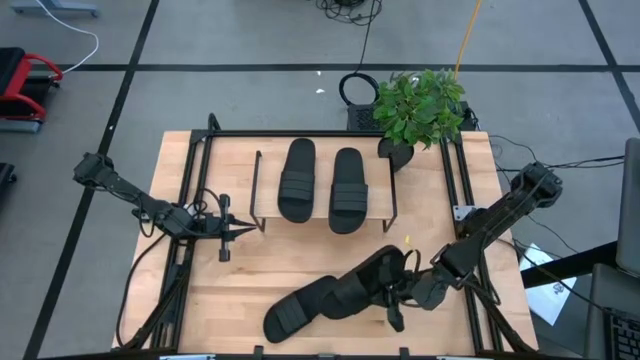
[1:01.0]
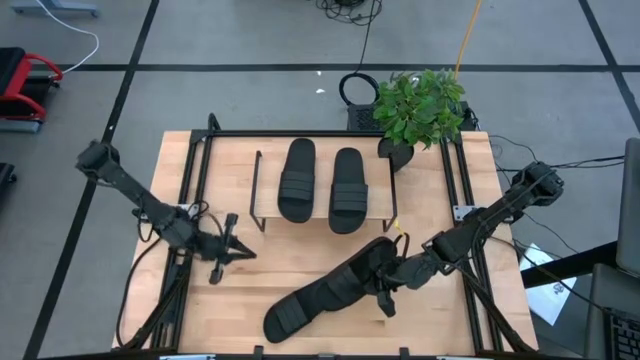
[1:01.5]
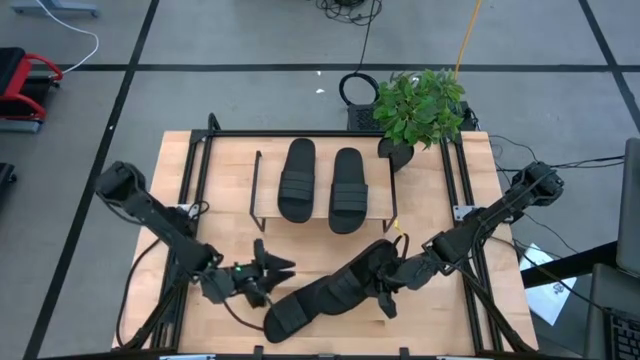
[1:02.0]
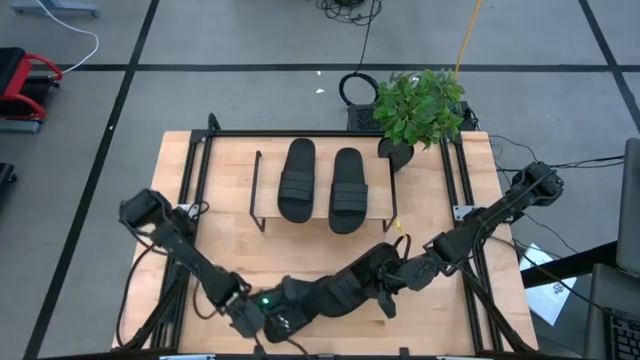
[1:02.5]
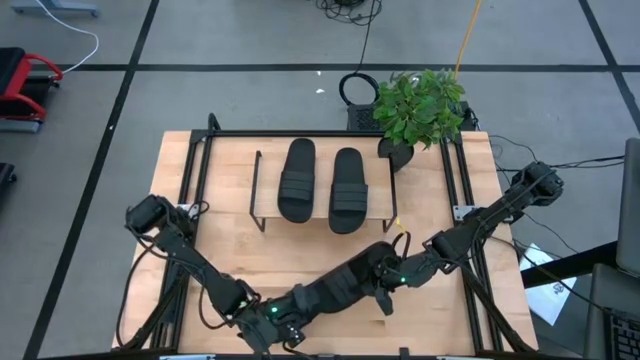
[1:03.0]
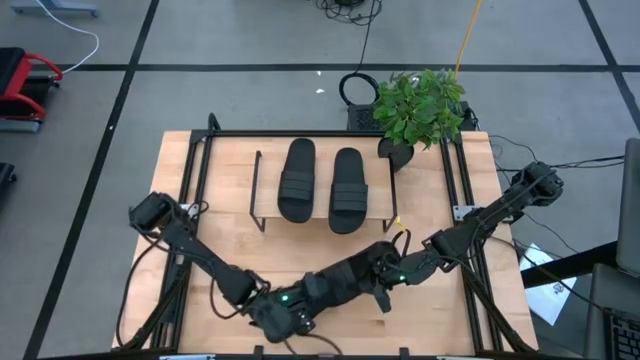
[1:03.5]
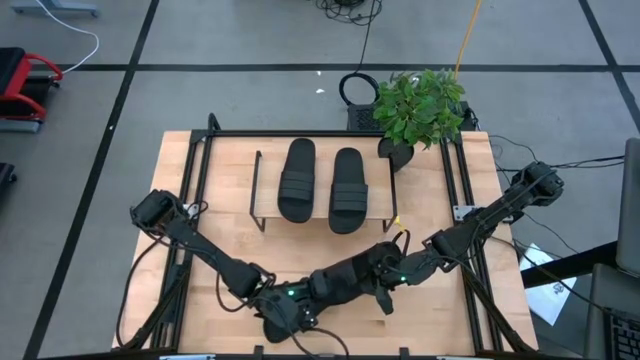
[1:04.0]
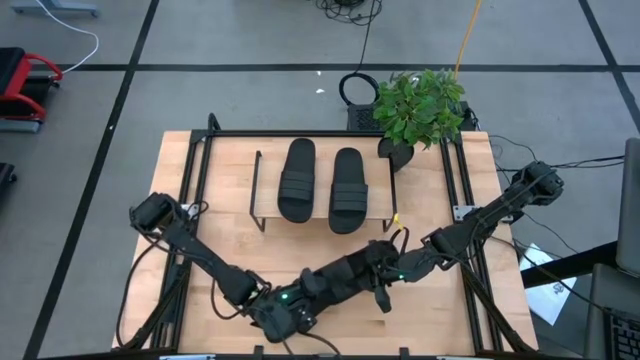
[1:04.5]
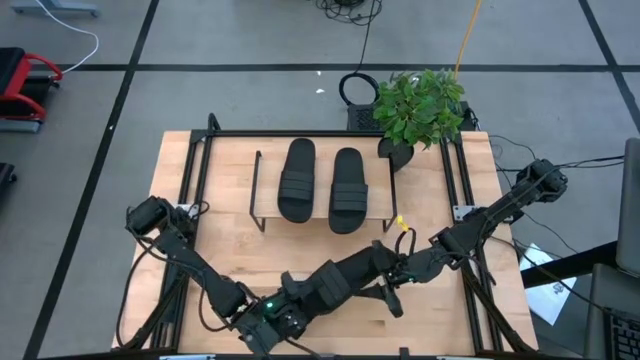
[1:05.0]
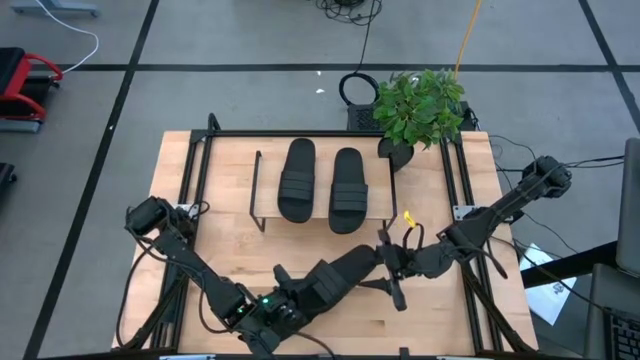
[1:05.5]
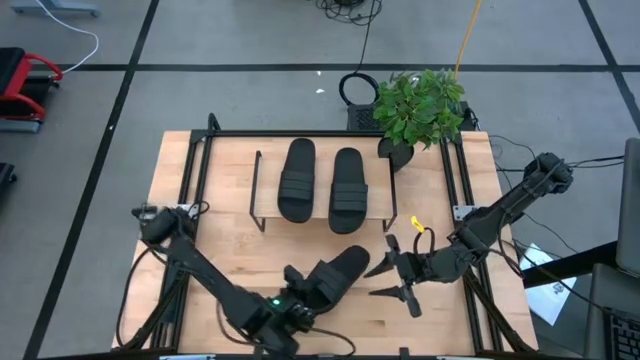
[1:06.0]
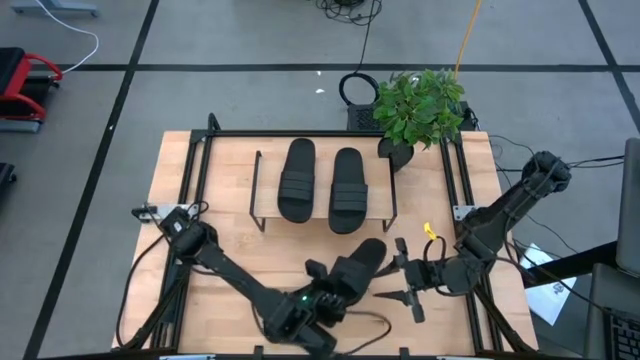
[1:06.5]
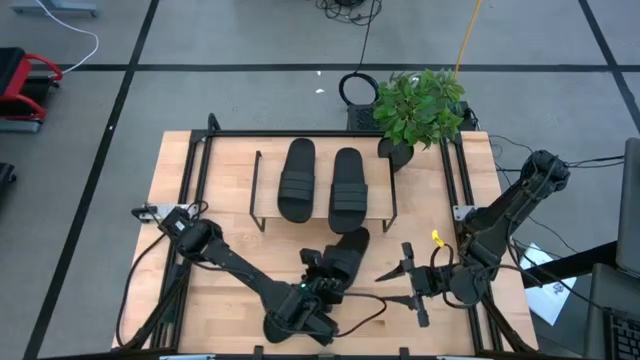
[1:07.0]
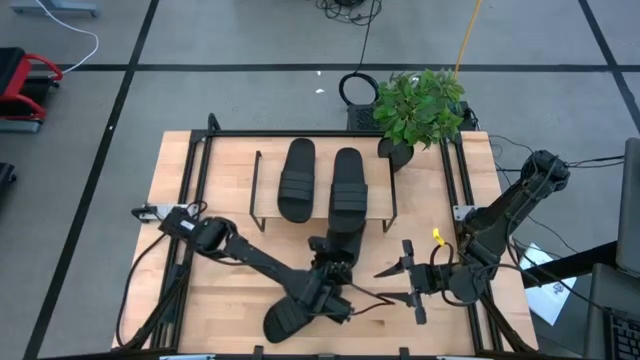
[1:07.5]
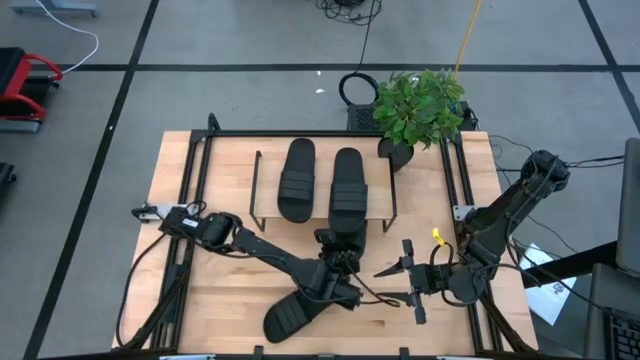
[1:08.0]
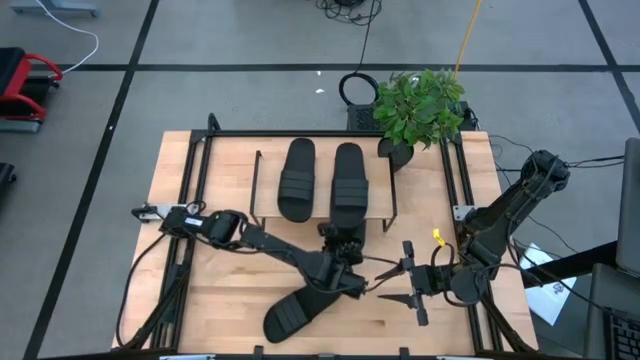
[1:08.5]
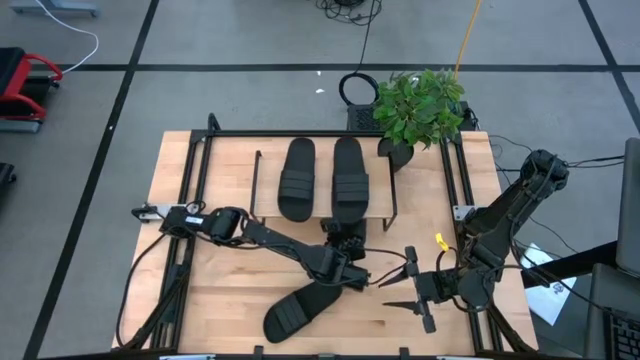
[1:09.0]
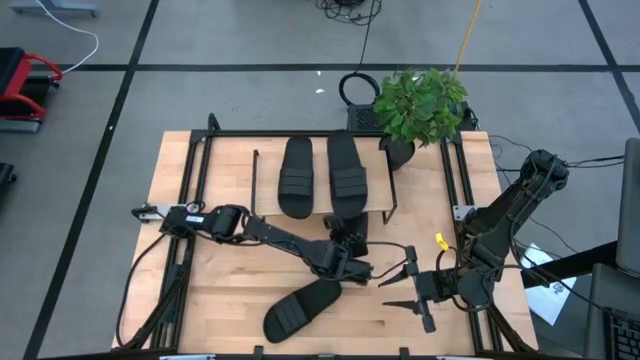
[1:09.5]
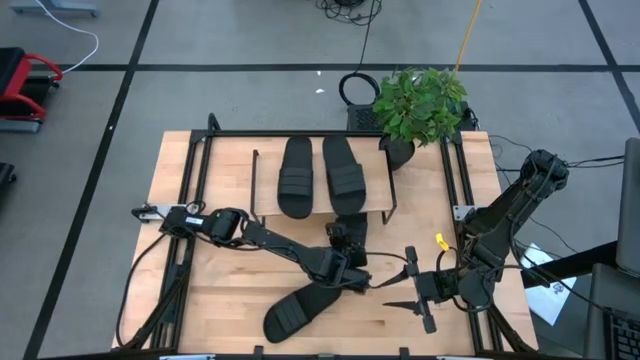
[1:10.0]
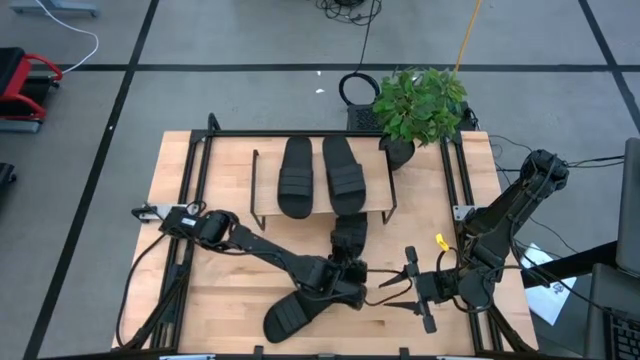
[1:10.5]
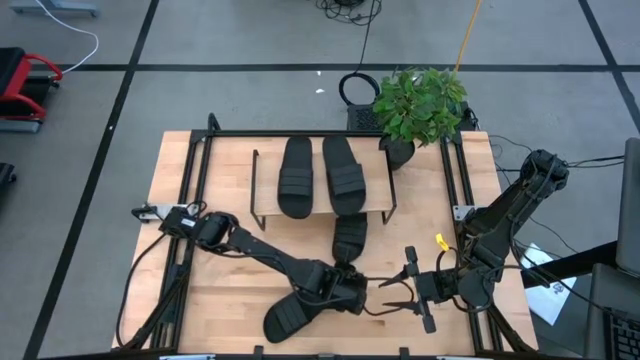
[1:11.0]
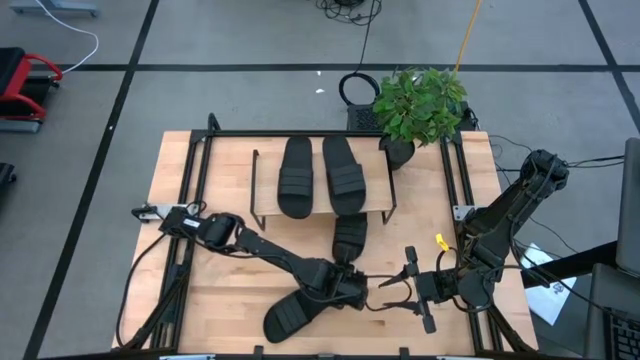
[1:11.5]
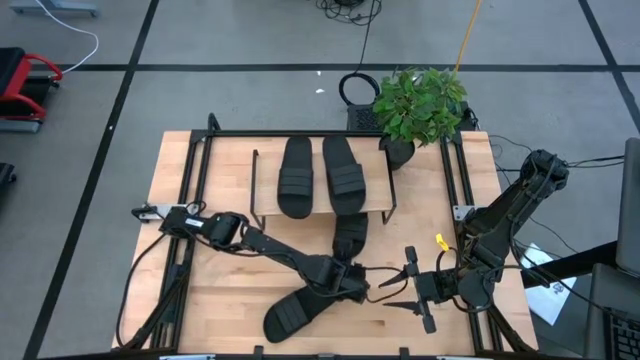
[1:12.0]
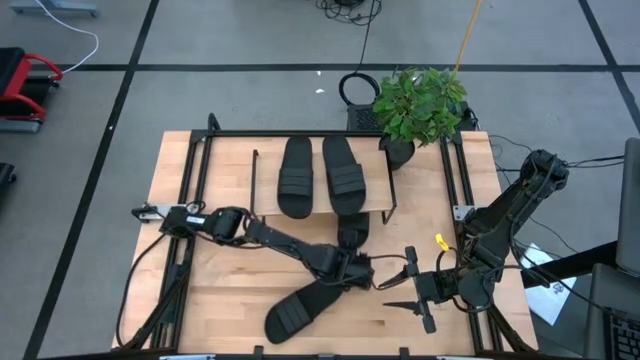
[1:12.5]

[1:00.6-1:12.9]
Task: Pick and place slides into the shelf
Put the black slide under the shelf
